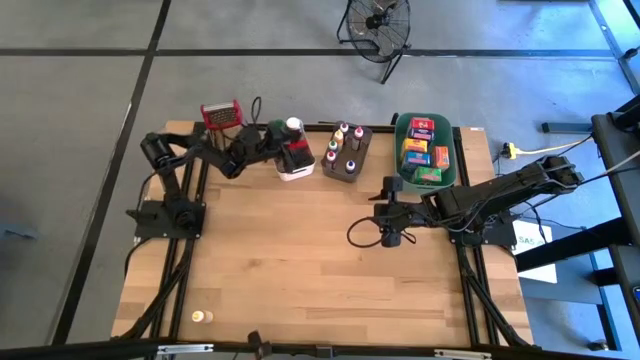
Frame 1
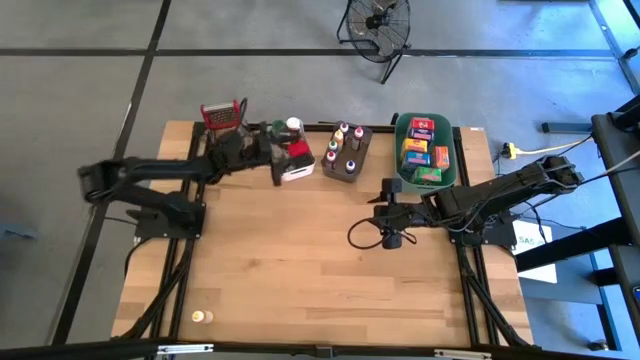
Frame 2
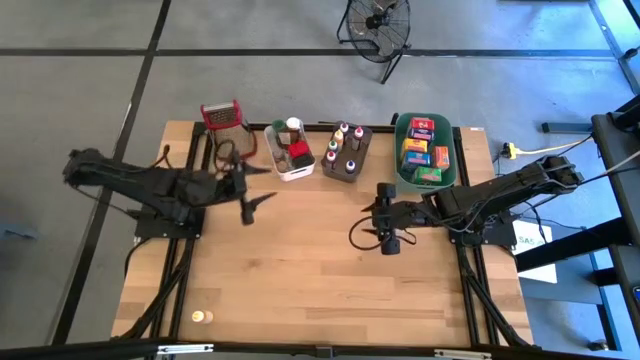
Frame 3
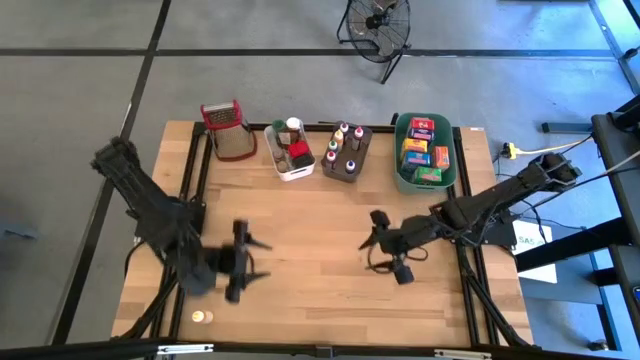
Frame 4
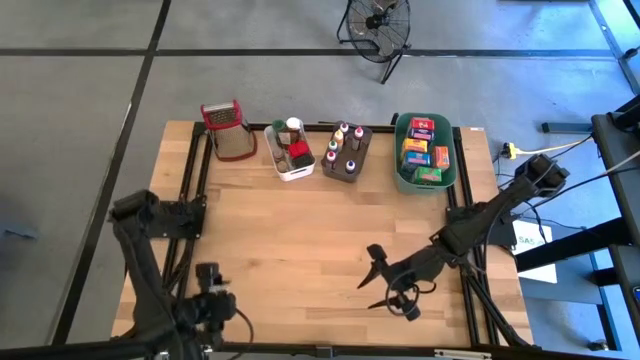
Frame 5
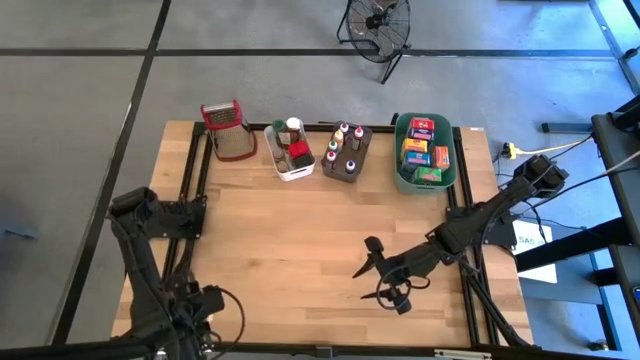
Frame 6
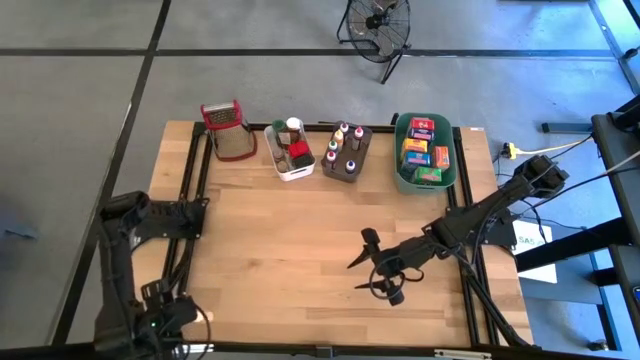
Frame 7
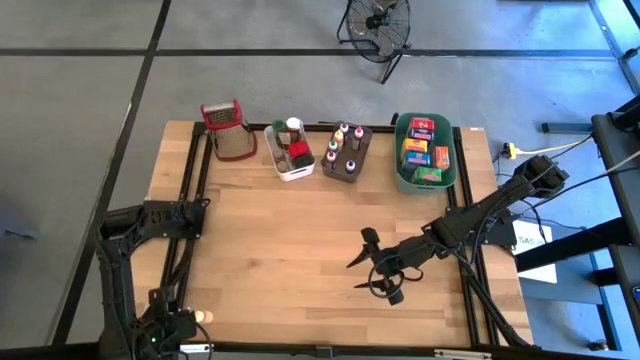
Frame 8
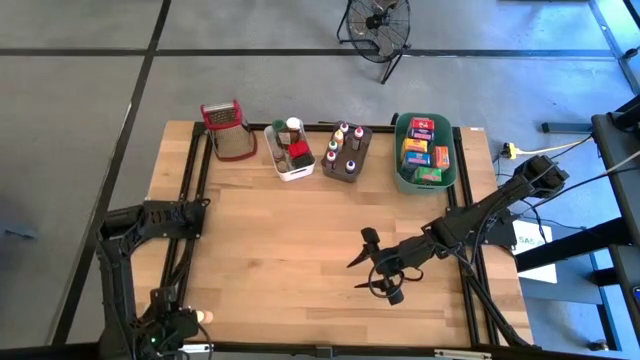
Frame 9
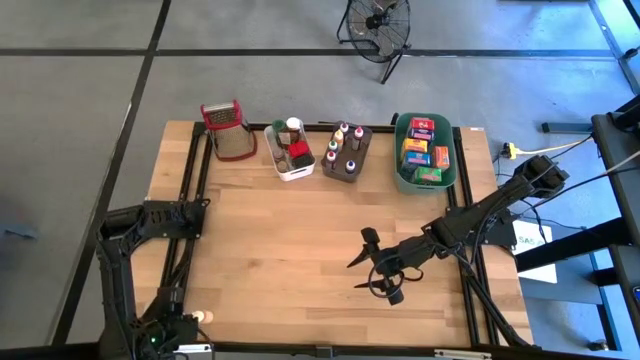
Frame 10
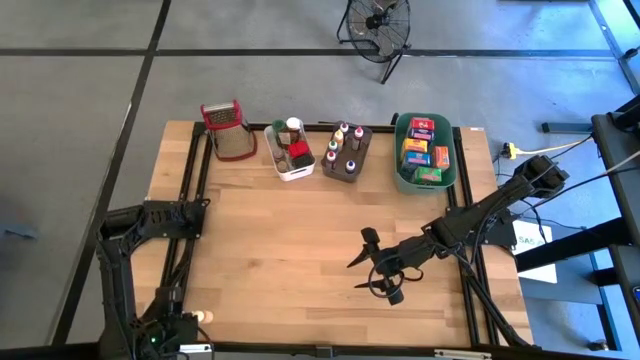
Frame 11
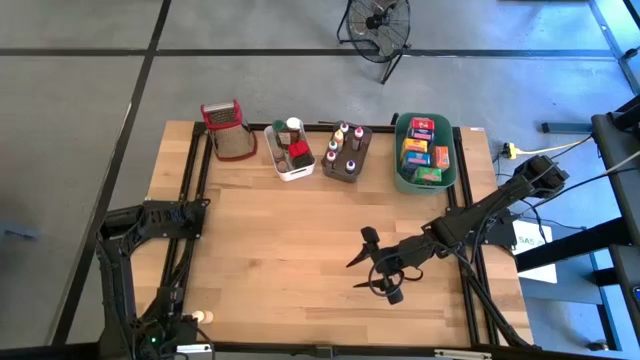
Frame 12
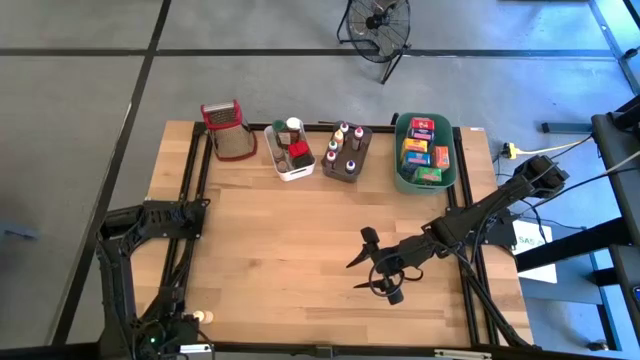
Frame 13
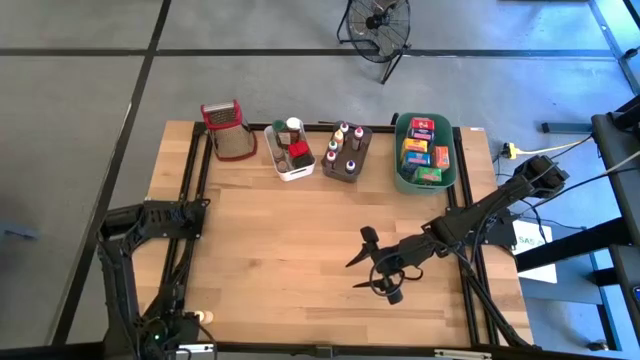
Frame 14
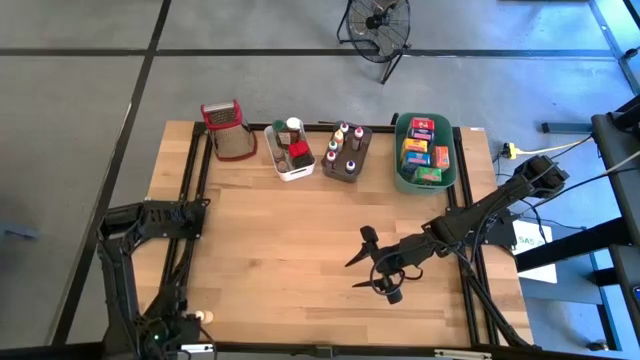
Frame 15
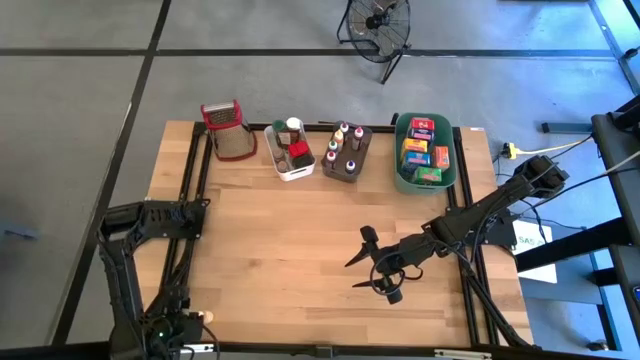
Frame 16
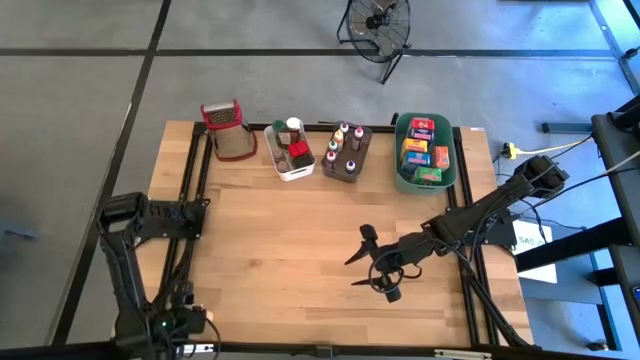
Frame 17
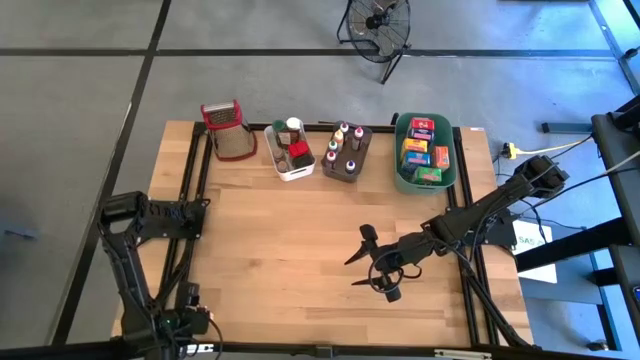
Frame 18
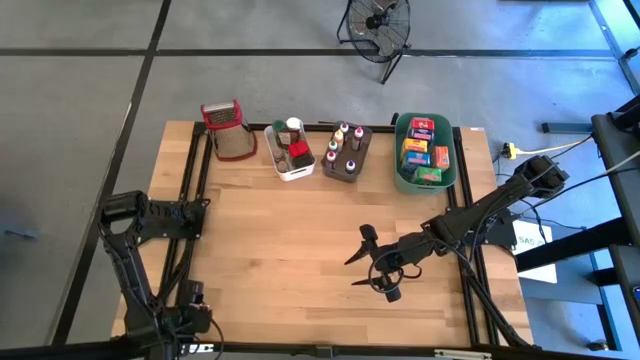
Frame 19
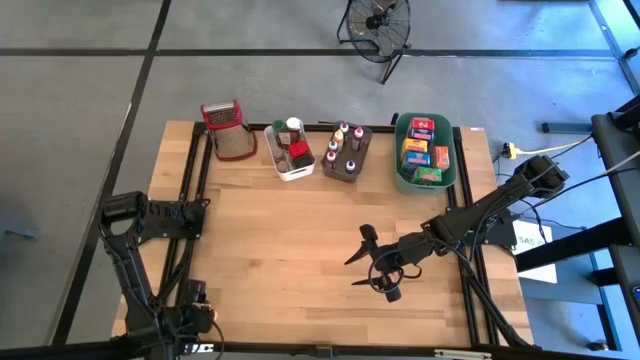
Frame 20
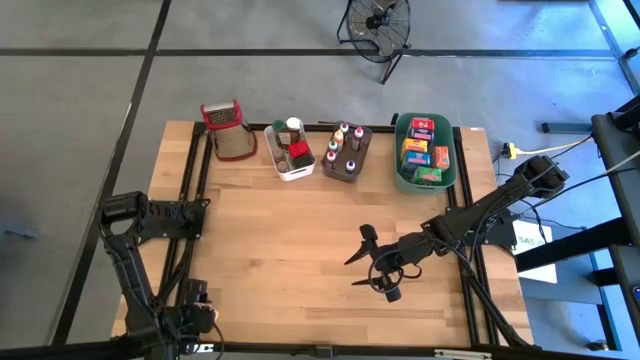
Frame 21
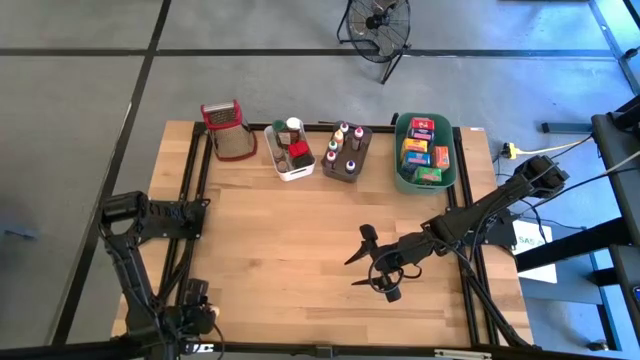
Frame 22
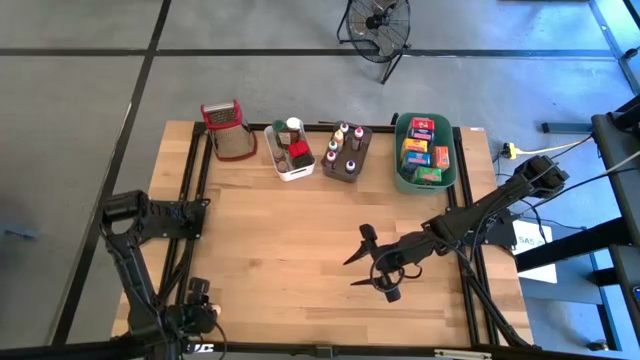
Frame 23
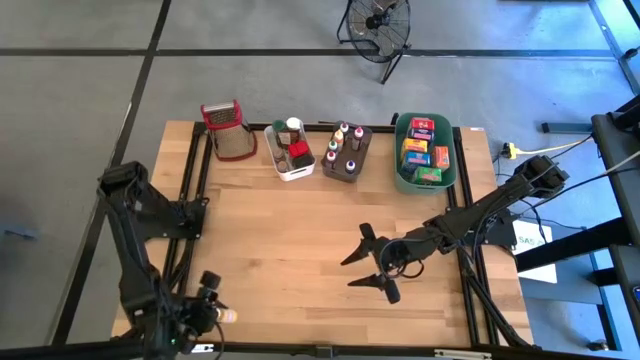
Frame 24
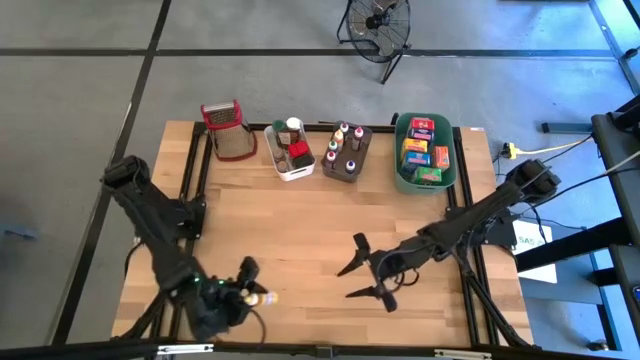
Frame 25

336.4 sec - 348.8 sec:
Task: Pick & Place Kitchen Items
Put the yellow coloring bottle into the black transparent bin

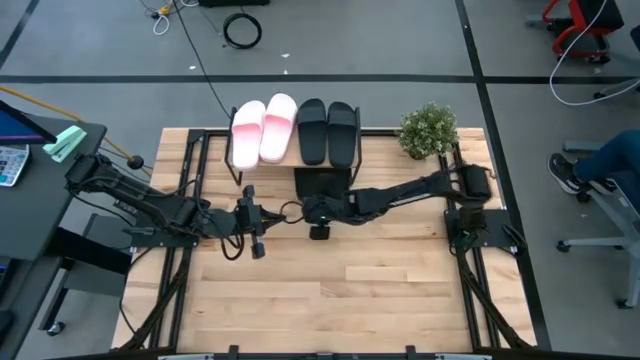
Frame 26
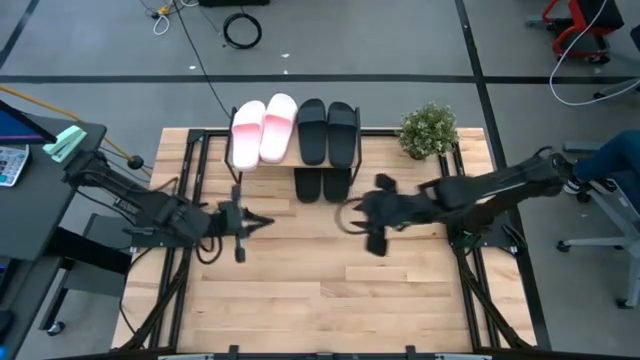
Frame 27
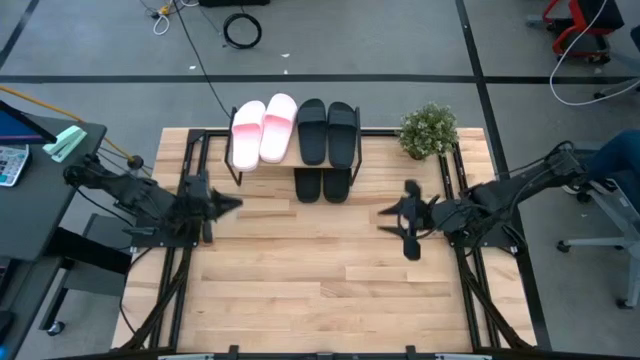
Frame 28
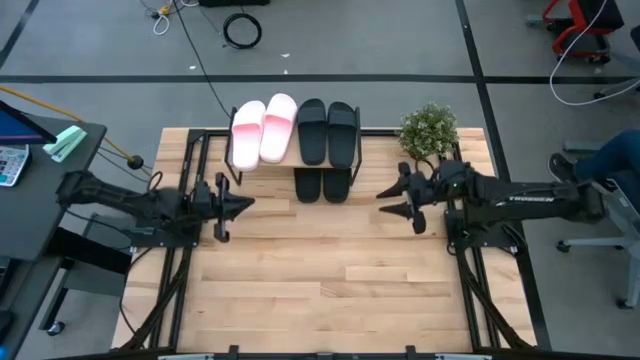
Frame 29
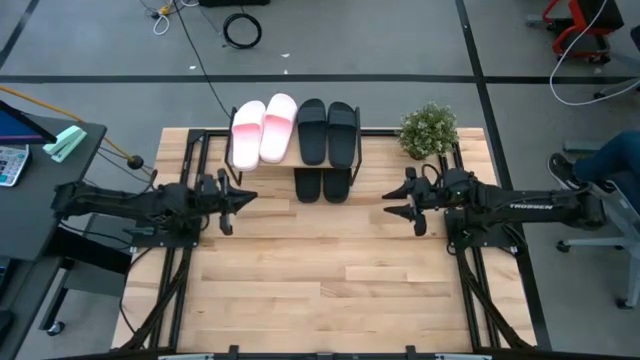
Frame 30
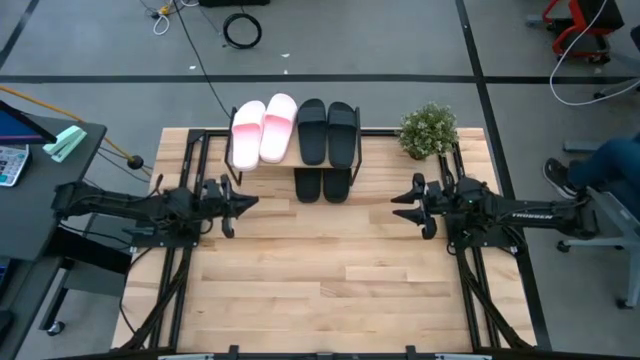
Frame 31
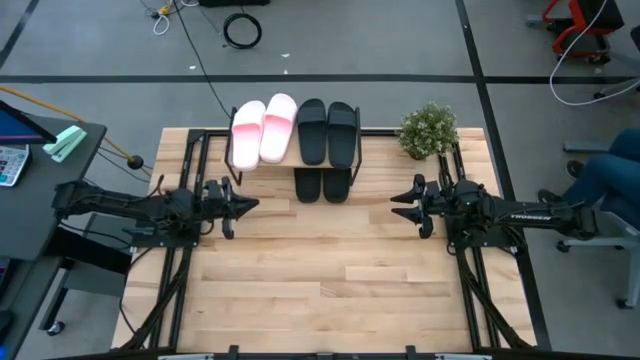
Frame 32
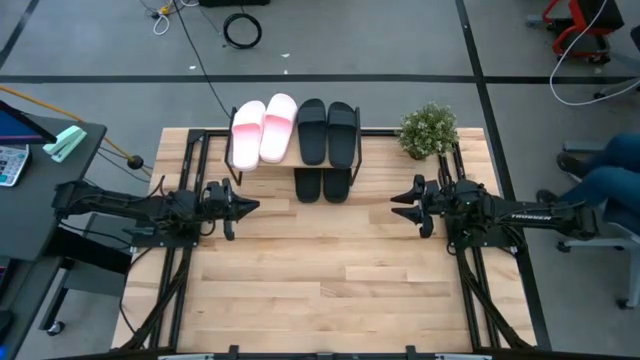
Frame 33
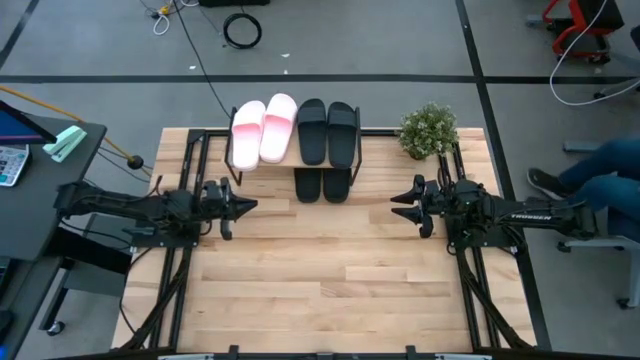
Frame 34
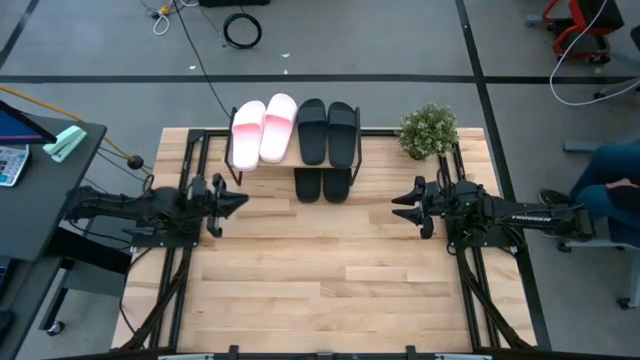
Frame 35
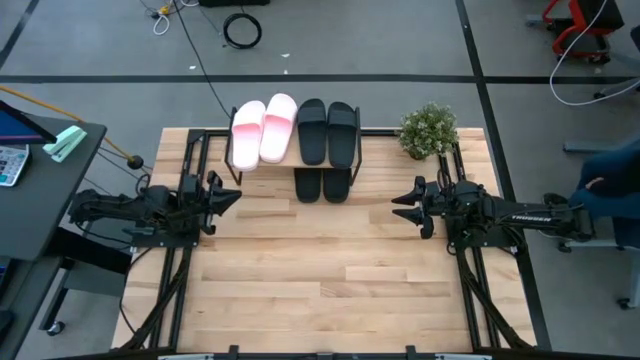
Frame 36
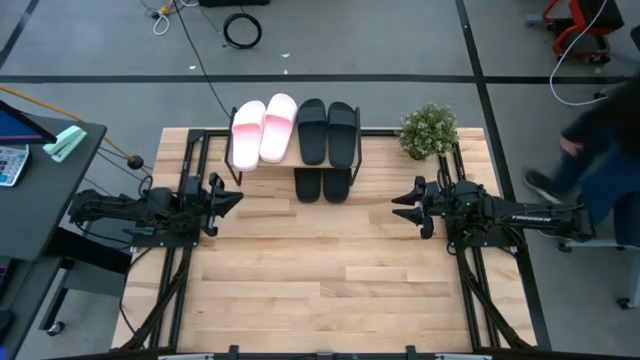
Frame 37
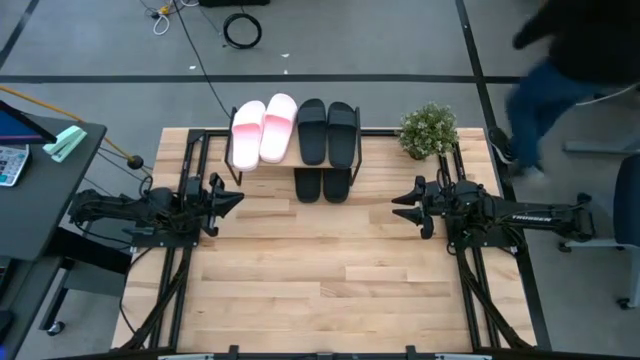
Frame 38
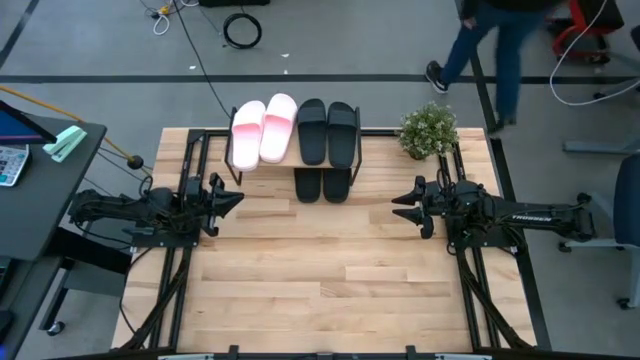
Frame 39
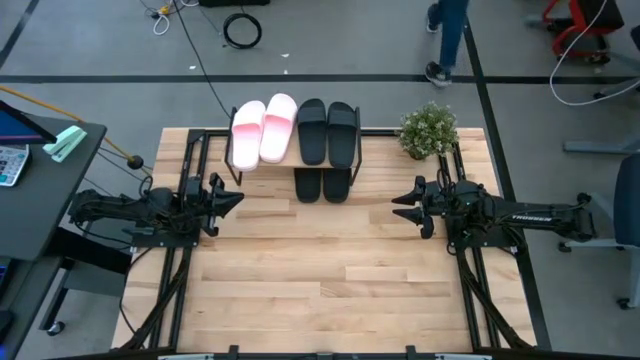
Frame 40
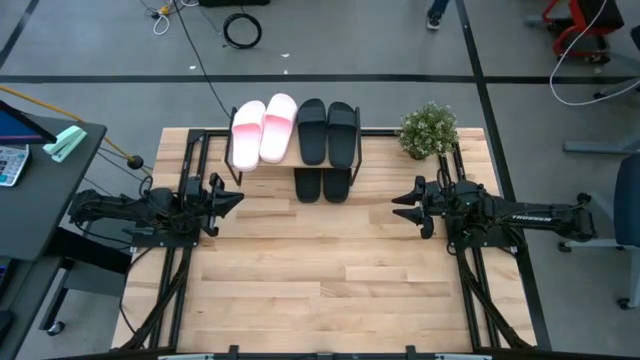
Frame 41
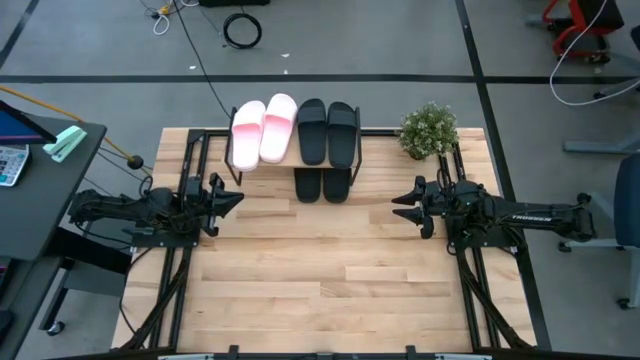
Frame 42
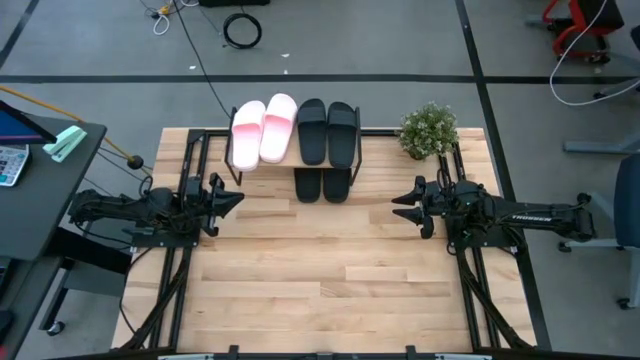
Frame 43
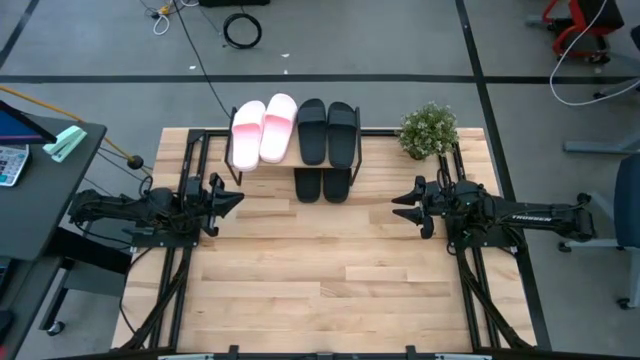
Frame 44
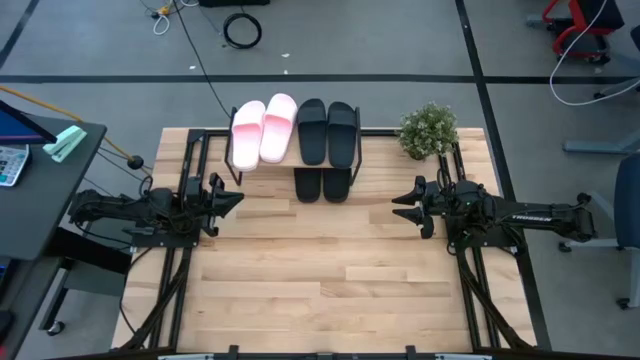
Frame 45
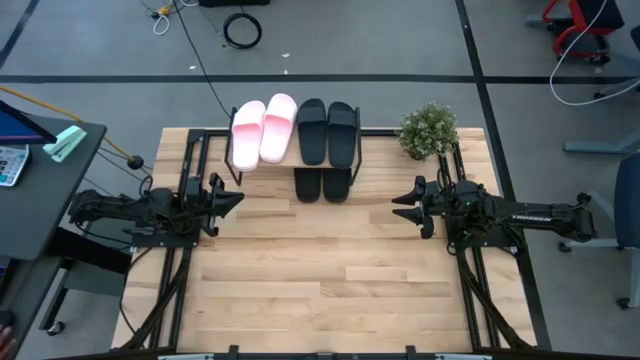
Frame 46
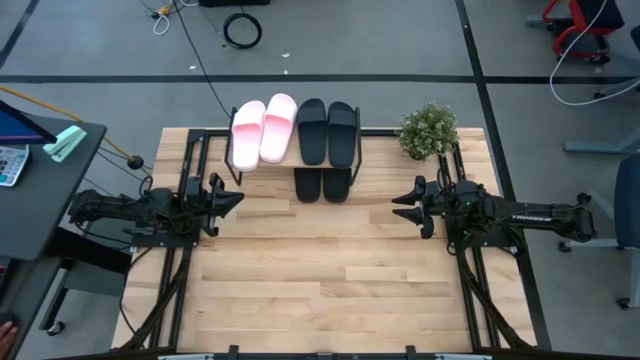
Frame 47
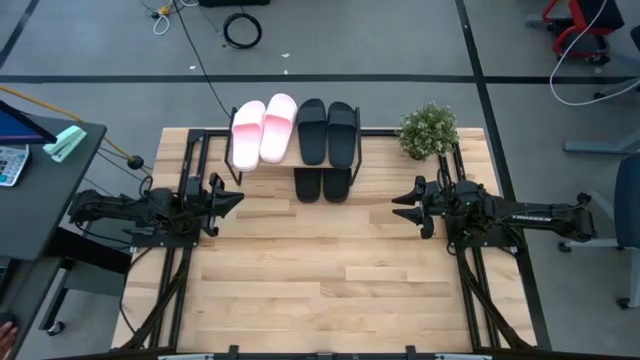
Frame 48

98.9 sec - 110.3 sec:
Task: Pick and place slides into the shelf
Return to Home Position
